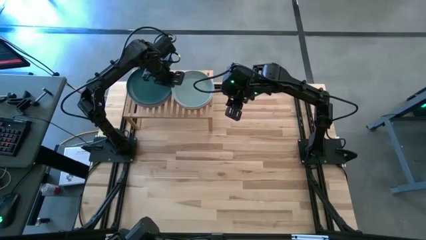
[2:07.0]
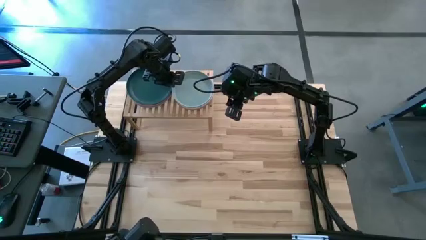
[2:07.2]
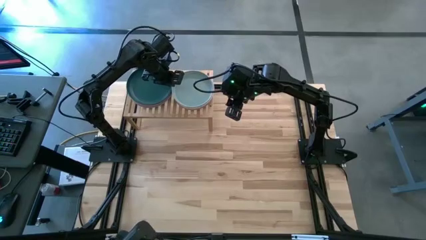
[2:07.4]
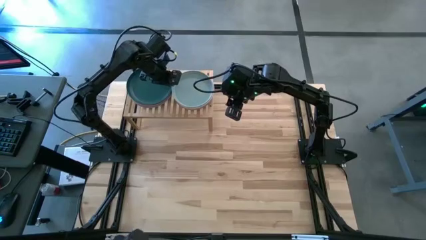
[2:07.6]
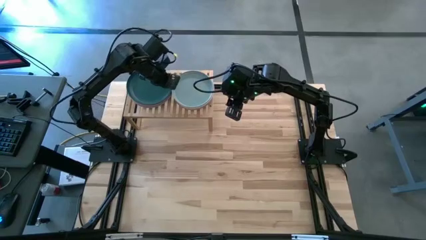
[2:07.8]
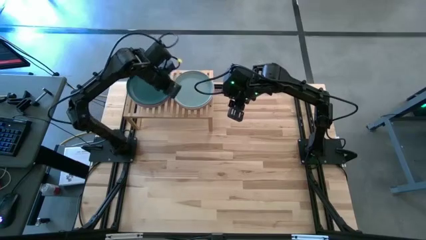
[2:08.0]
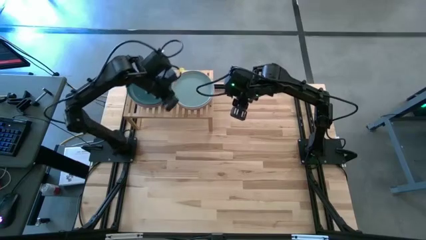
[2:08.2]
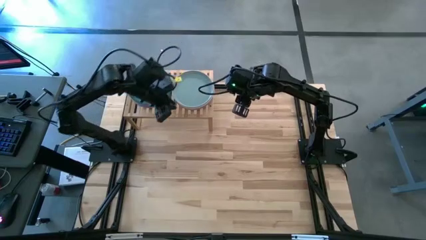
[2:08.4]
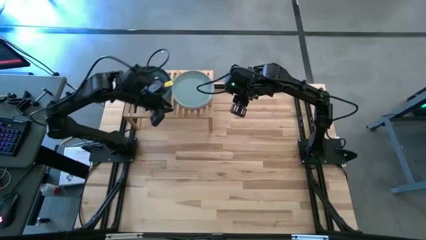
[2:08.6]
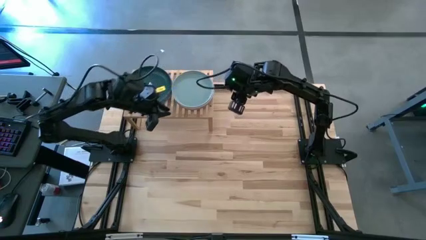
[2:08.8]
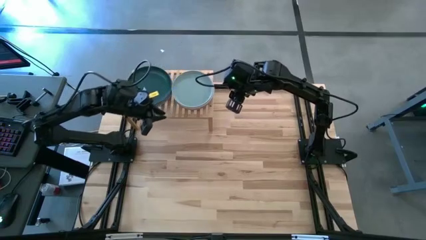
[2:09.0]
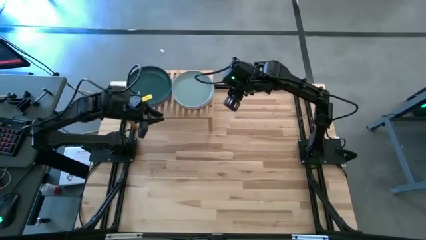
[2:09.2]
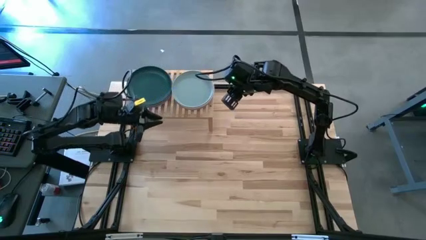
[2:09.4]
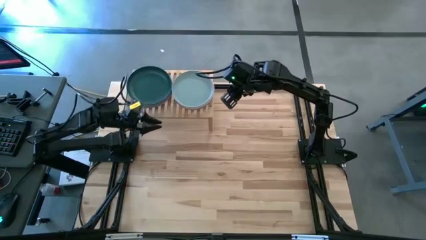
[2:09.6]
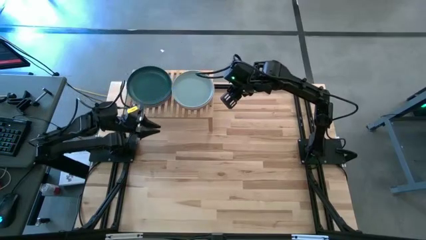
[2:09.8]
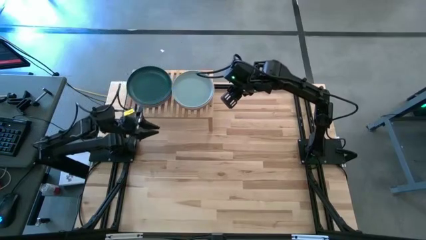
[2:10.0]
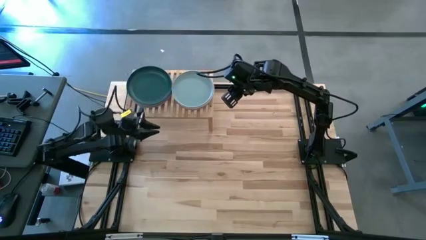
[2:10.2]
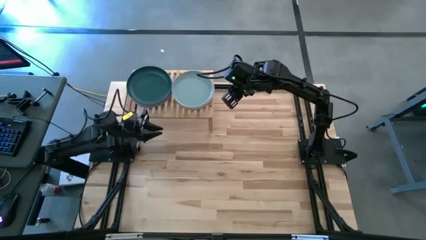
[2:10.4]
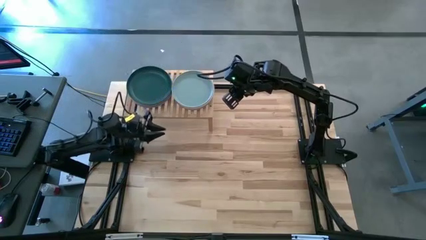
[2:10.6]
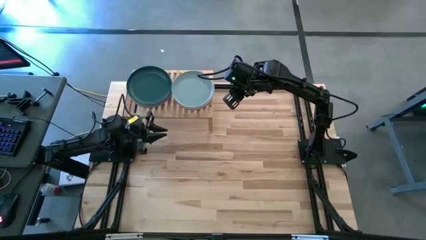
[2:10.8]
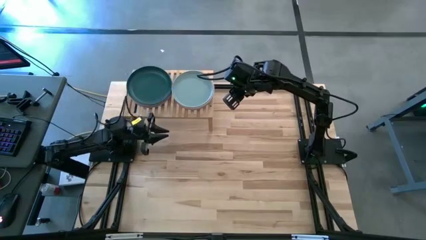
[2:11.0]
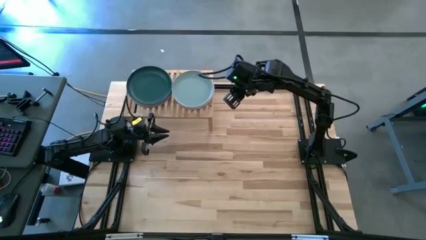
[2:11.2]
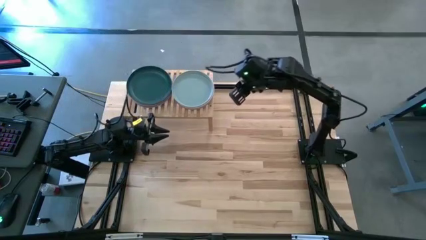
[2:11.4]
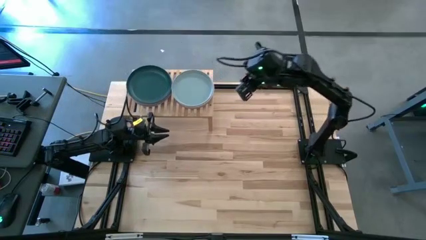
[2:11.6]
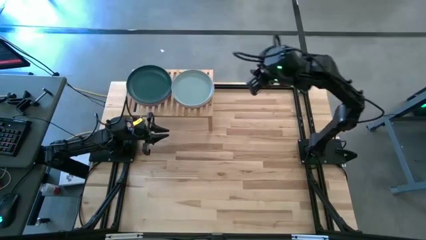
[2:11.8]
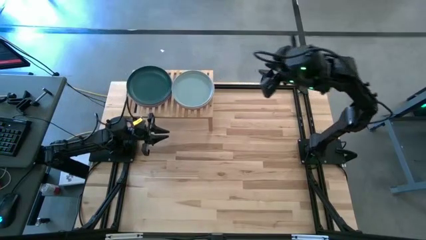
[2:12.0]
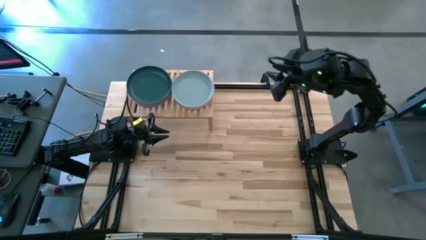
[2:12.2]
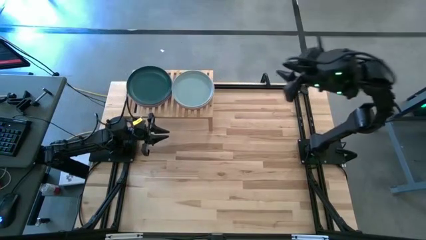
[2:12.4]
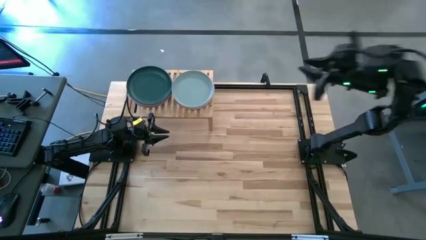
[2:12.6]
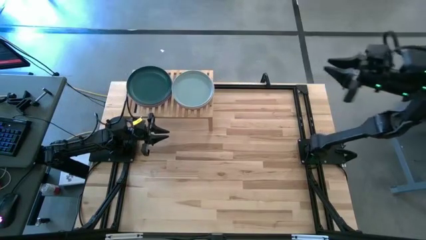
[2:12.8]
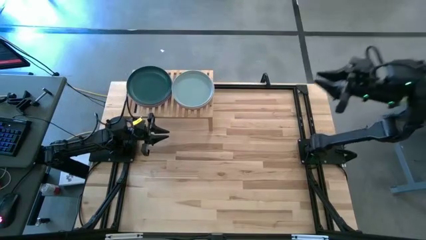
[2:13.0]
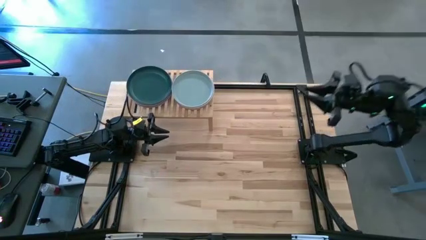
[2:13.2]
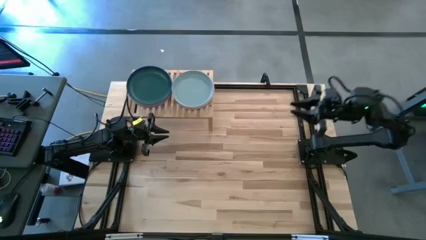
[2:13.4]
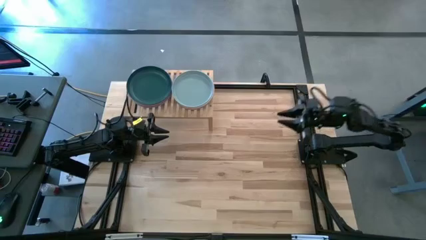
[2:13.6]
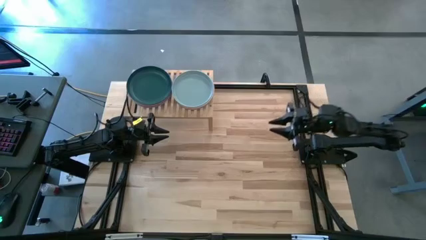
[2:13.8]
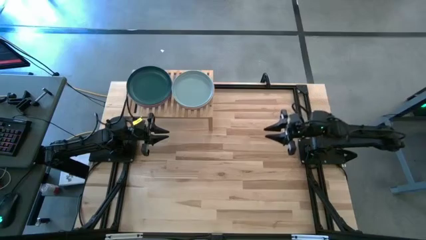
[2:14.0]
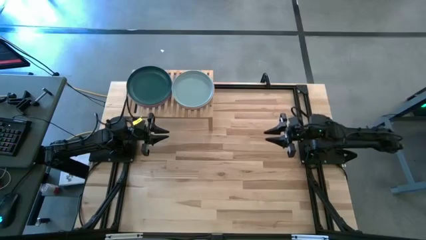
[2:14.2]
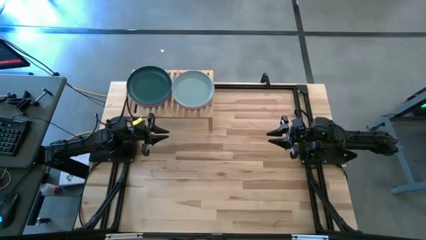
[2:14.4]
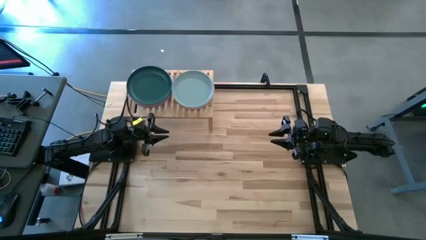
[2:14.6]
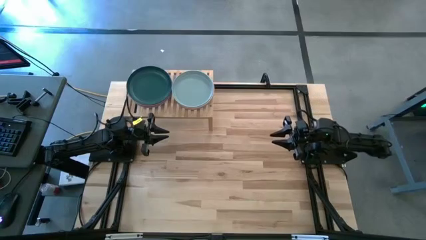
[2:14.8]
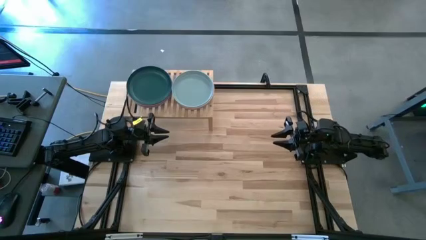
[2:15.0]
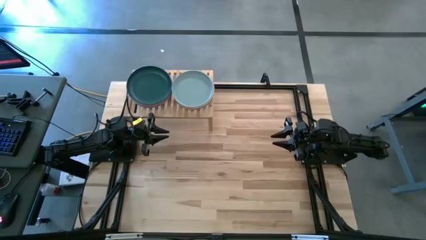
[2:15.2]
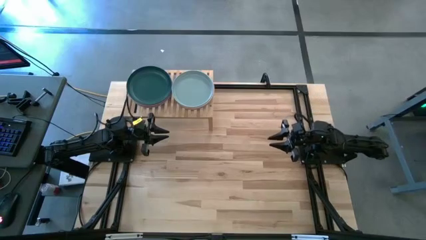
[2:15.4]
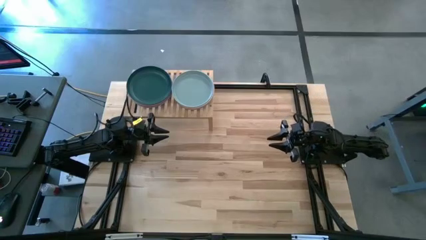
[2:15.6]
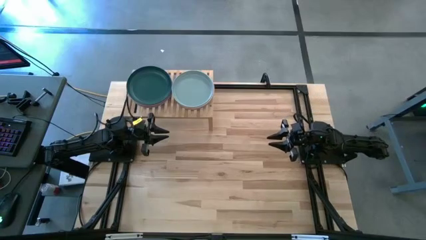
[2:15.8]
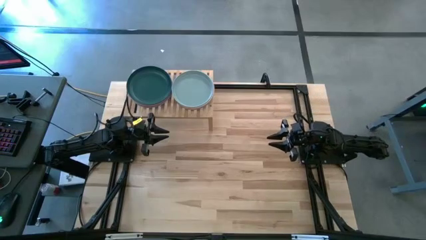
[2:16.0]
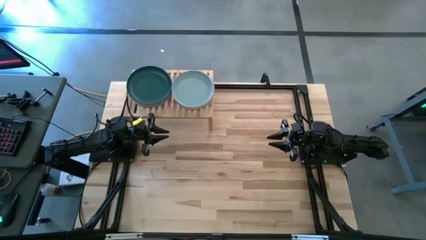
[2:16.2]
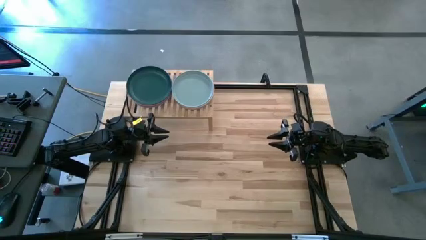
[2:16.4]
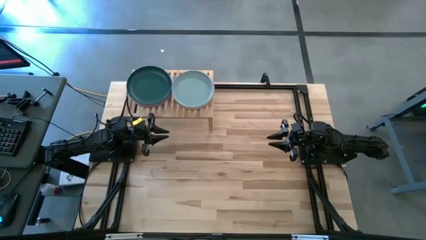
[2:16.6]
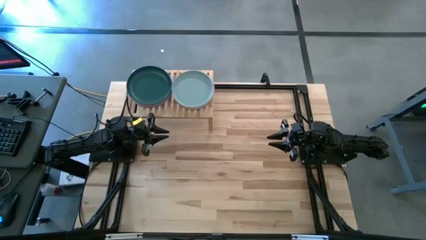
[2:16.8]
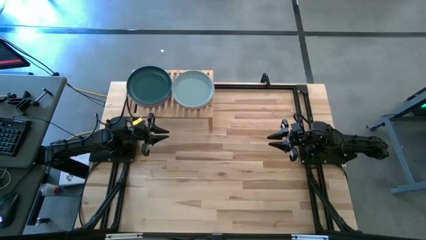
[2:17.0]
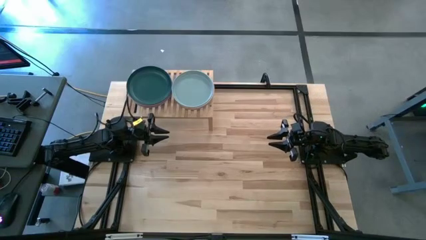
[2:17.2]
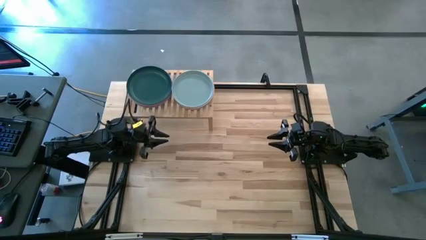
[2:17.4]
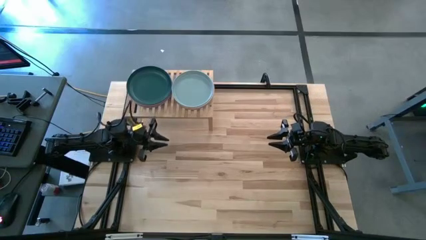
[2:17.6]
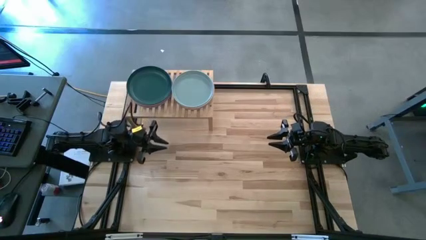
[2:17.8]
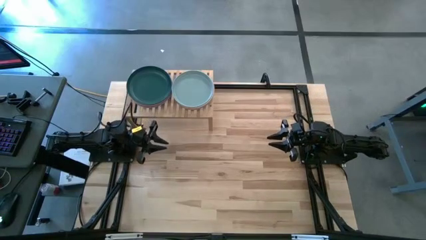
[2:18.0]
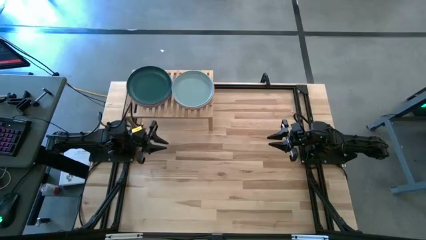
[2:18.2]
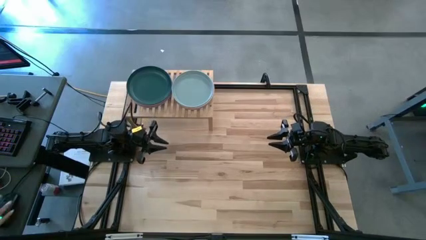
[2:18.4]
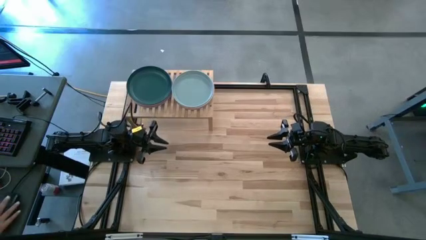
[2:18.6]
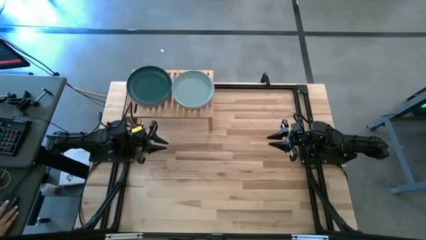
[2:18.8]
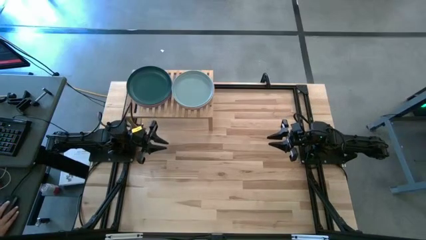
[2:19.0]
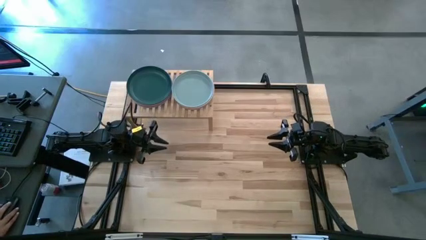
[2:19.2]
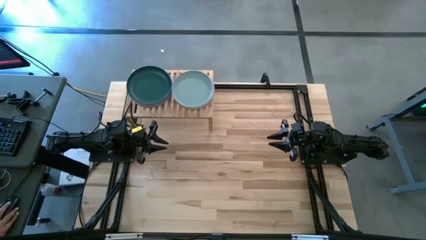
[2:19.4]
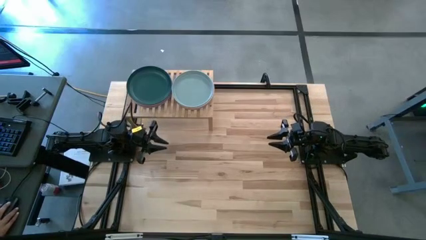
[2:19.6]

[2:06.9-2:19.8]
Task: Place and stack plates onto a shelf
Return to Home Position
